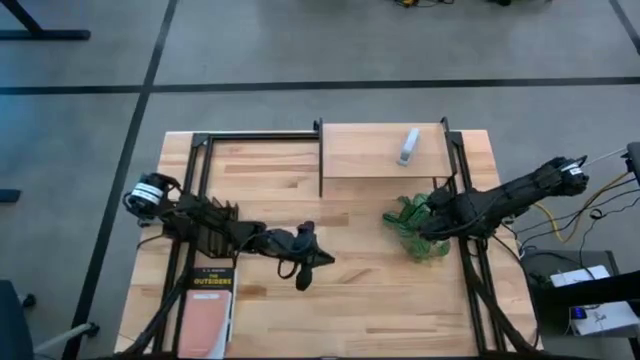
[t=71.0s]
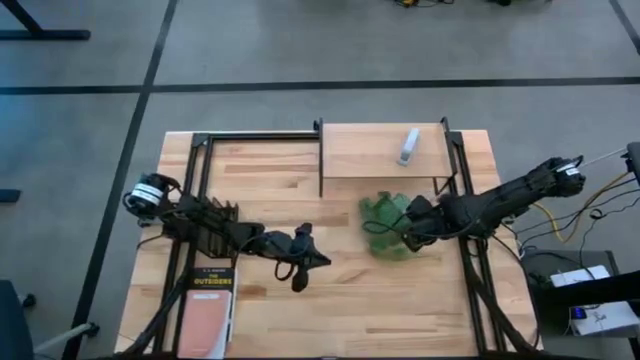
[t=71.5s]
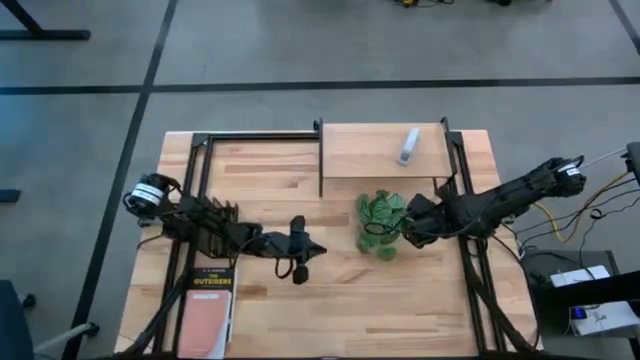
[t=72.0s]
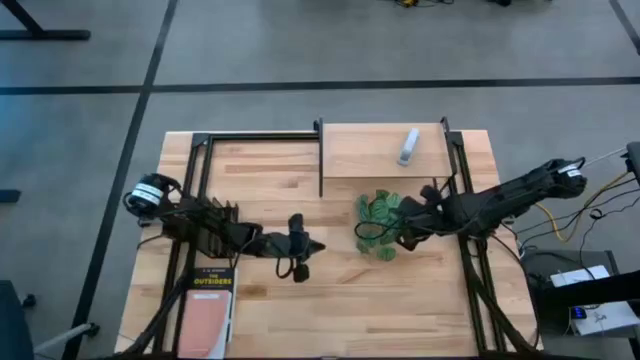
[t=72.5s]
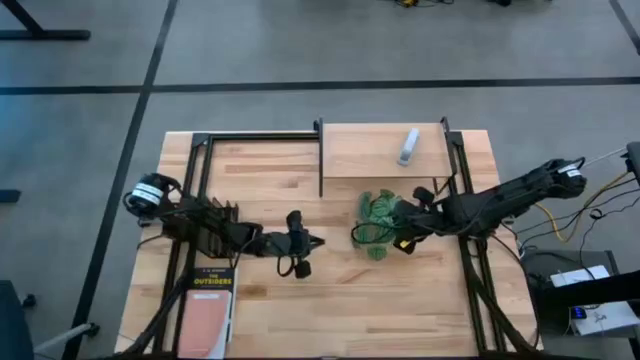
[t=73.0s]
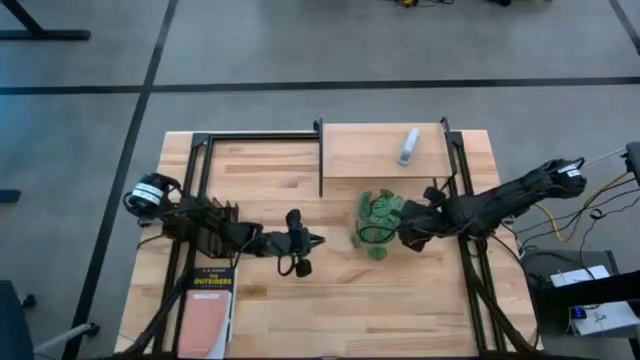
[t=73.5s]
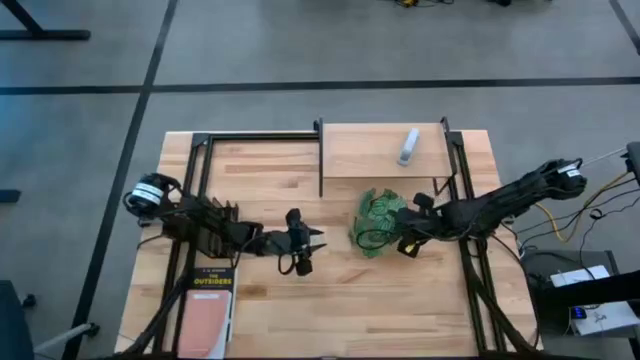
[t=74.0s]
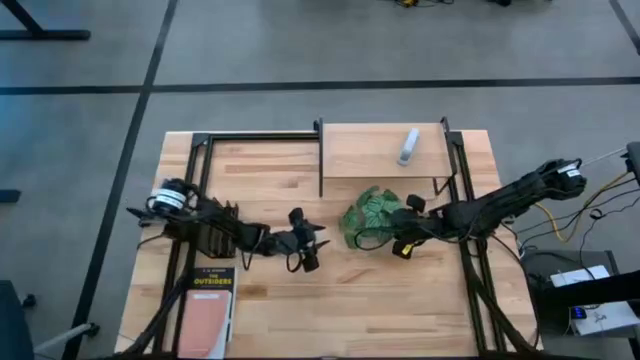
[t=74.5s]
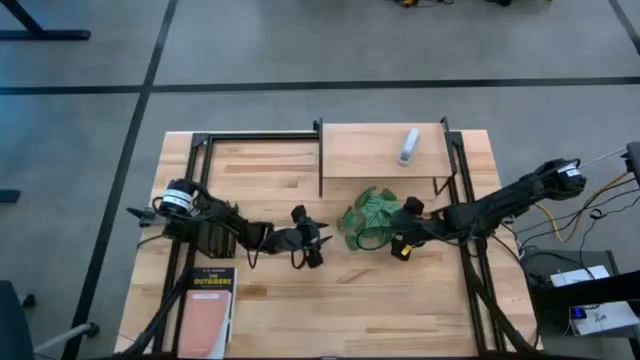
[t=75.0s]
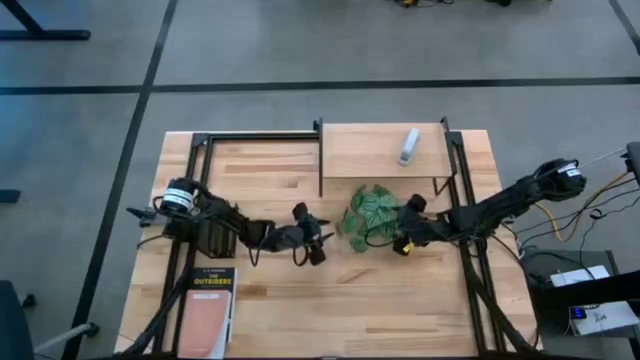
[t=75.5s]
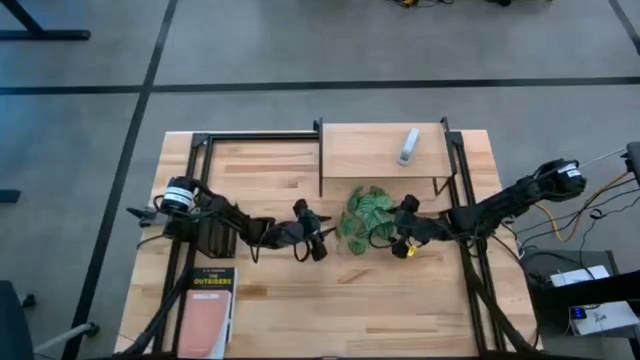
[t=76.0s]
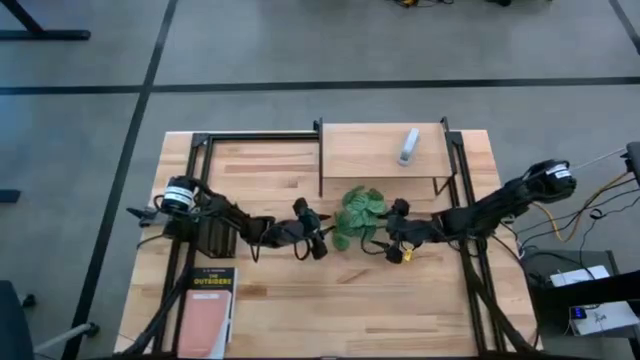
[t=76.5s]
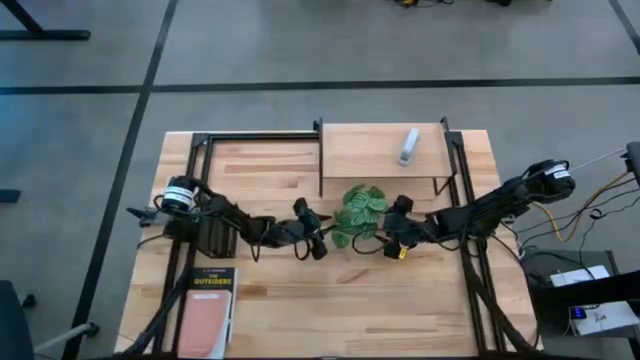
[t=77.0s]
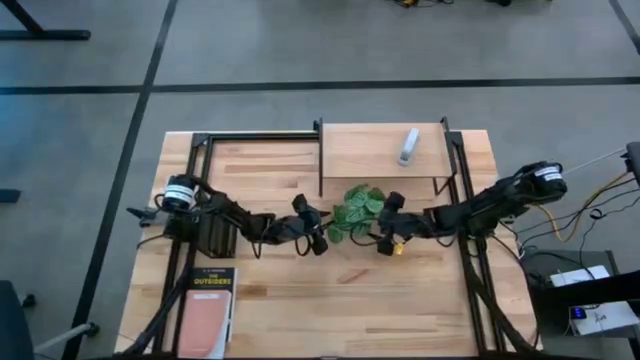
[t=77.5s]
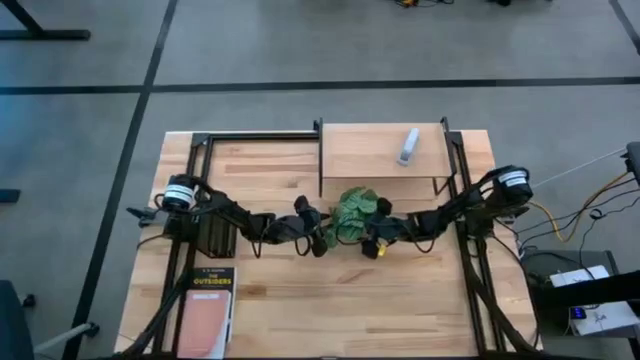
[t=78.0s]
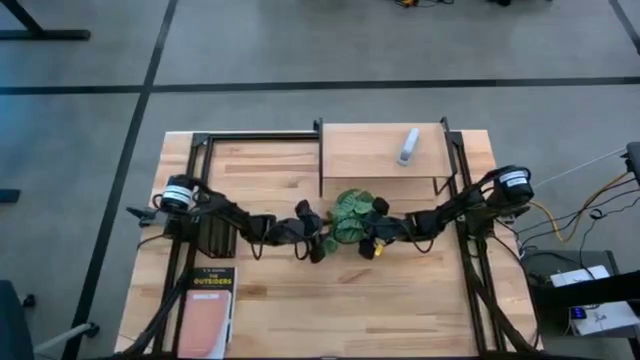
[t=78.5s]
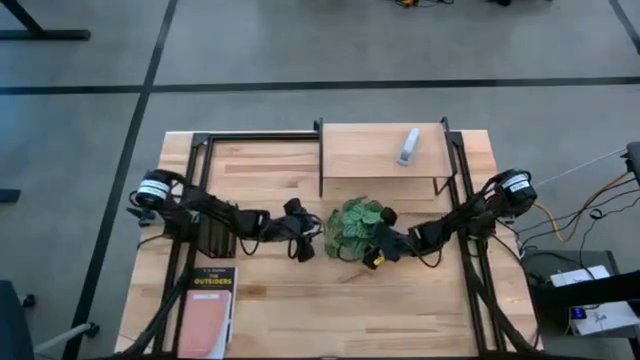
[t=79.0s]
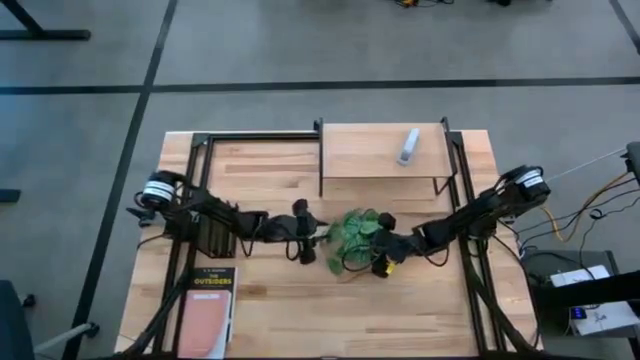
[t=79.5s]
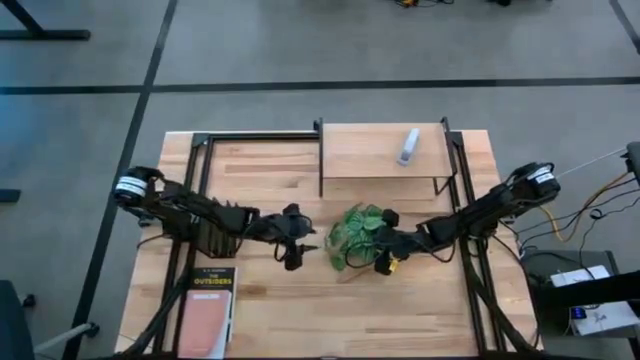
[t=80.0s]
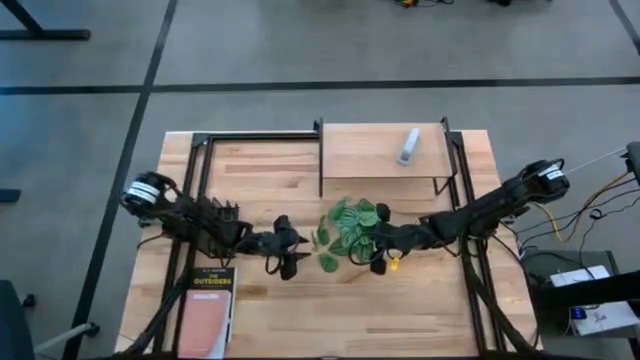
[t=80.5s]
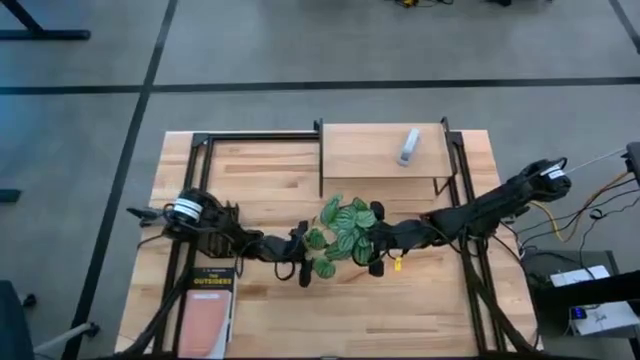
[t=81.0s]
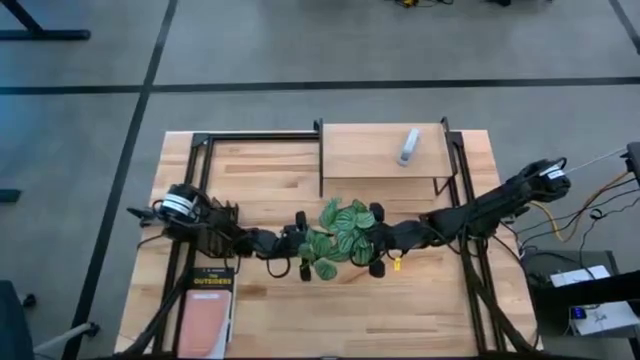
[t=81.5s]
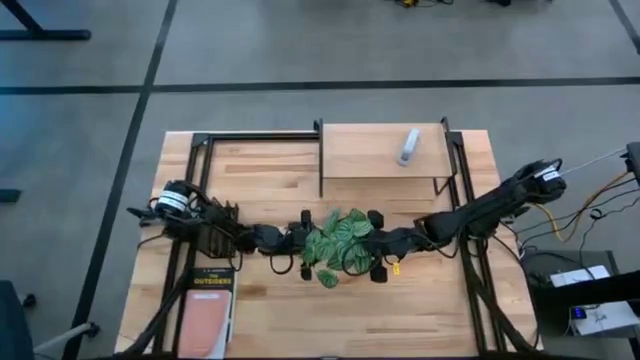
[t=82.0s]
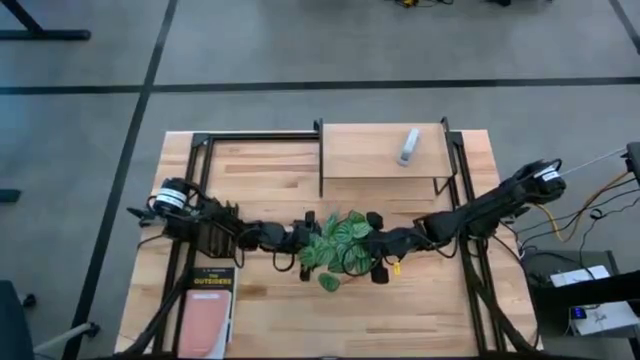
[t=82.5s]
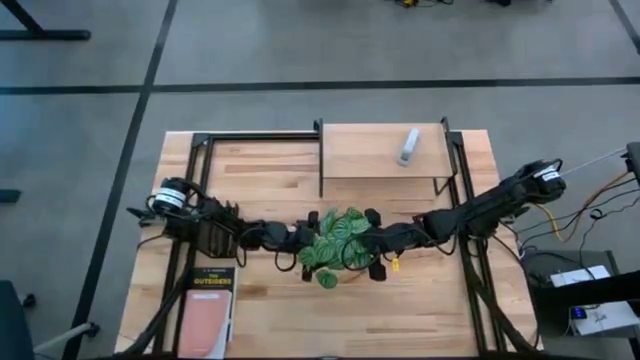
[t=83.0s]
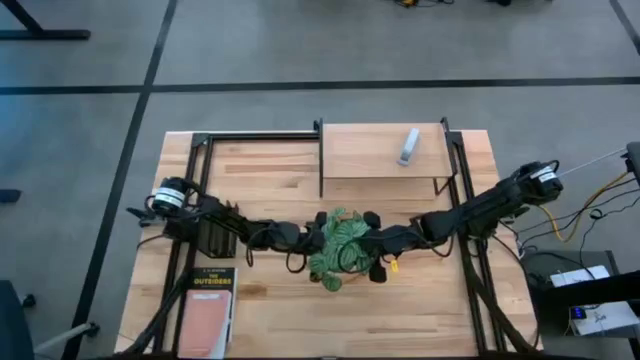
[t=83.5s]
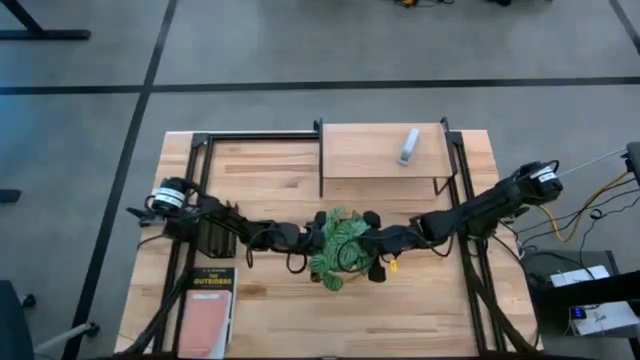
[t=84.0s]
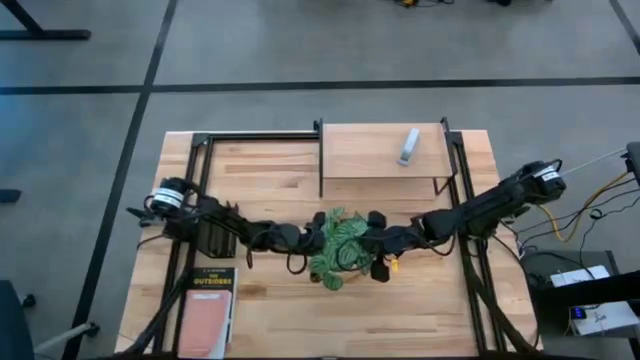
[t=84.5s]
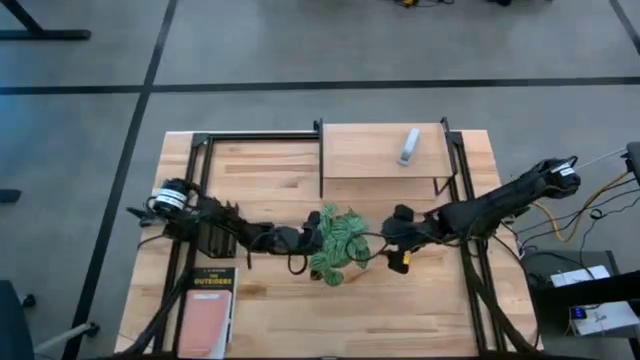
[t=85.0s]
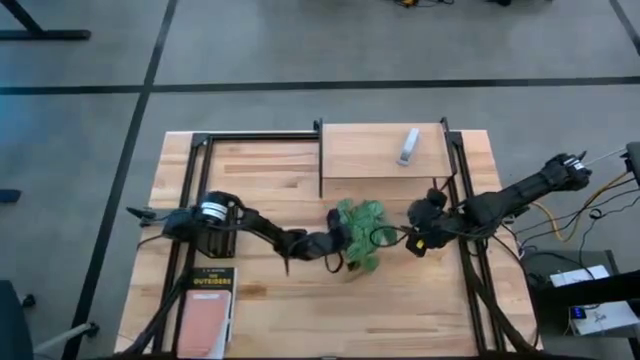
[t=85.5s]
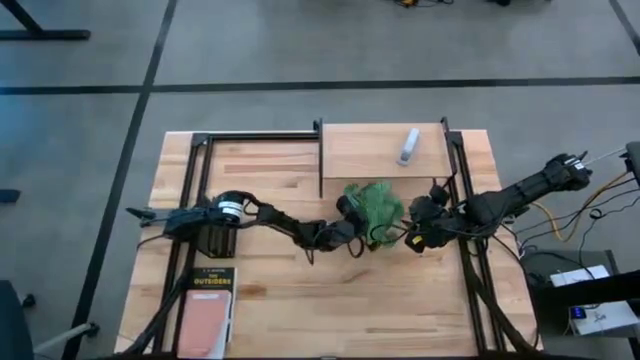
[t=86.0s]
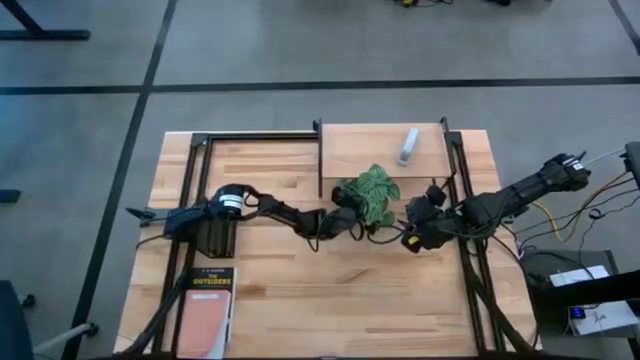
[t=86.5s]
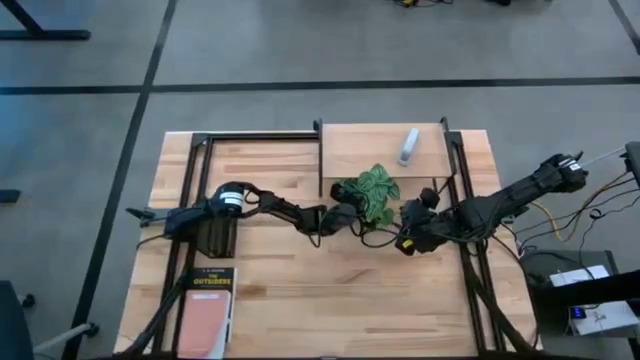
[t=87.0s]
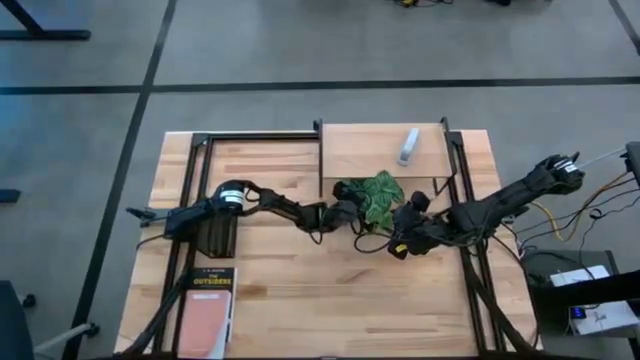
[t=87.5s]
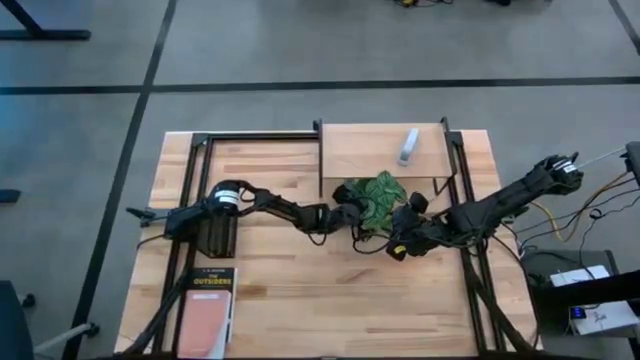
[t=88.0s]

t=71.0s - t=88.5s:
Task: Stock shelves
Put the white vase plant under the shelf

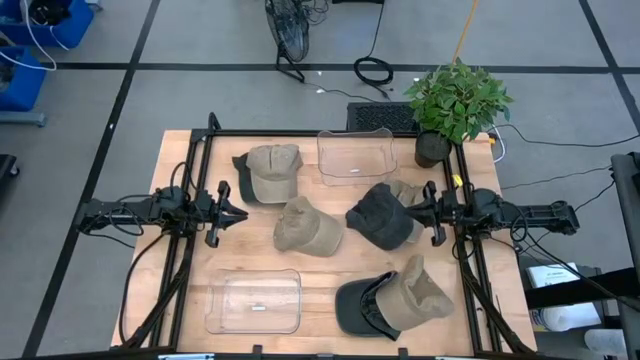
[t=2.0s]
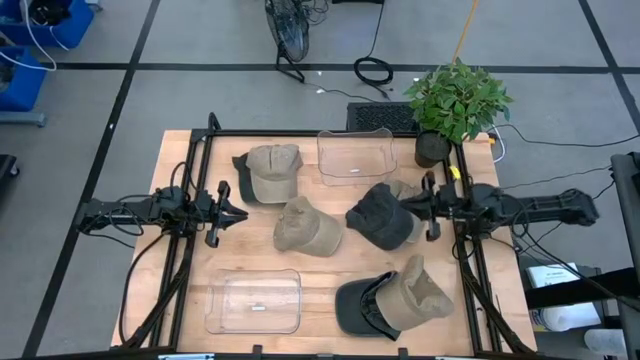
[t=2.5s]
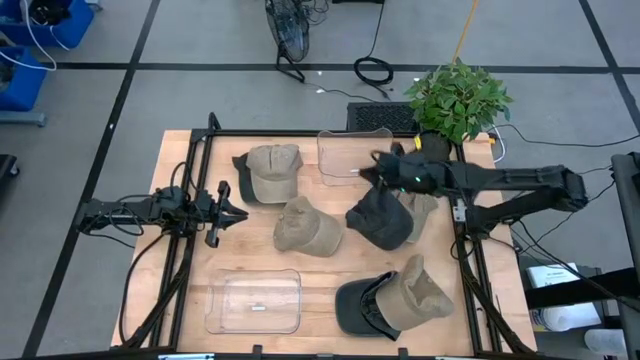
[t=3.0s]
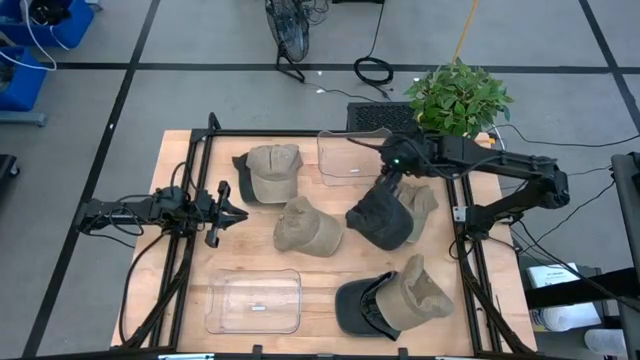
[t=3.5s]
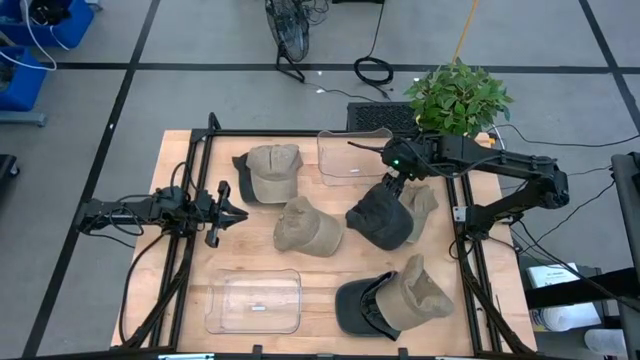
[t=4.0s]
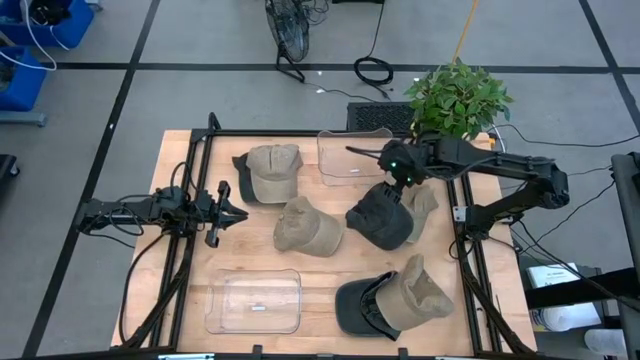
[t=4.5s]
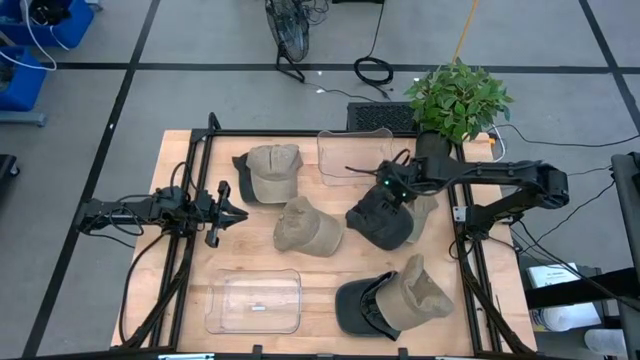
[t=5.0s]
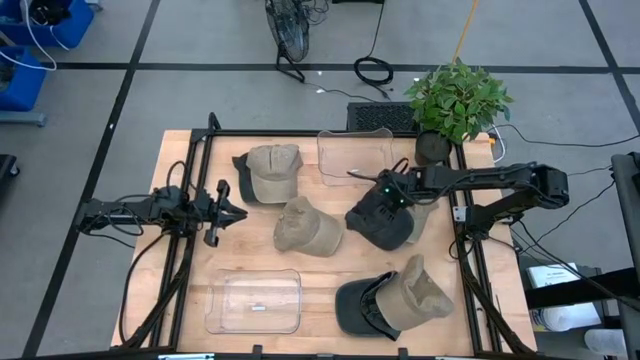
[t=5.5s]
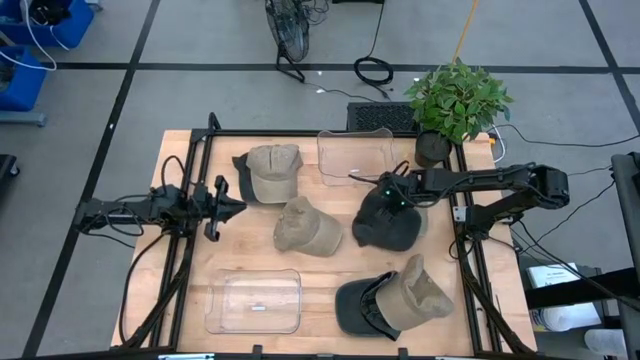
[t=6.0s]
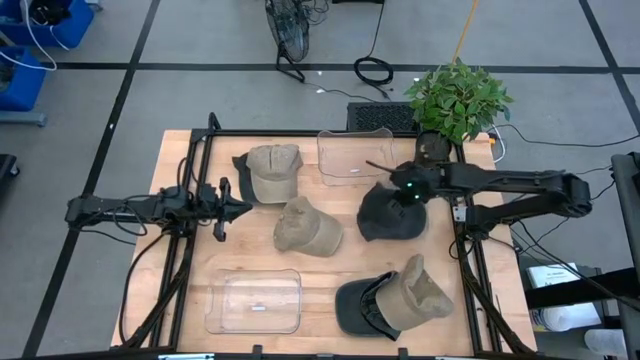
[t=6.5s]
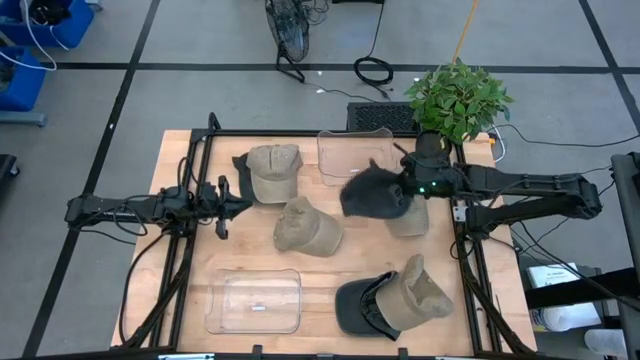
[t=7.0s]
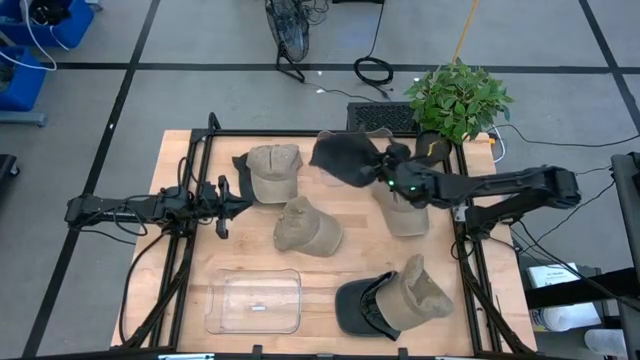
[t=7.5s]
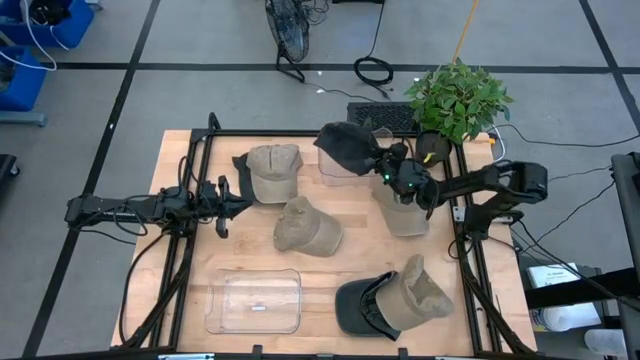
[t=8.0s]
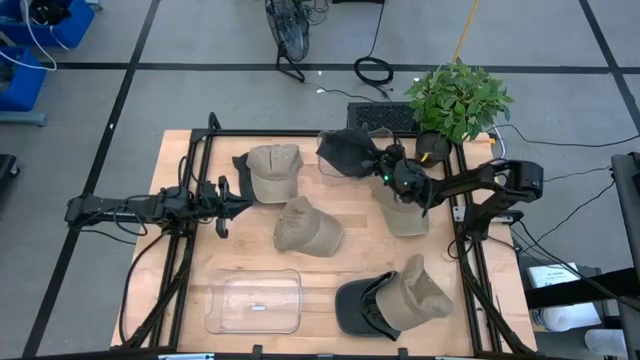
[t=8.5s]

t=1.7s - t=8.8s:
Task: Pick & Place hat
Put the dark gray cap into the top transparent bin
